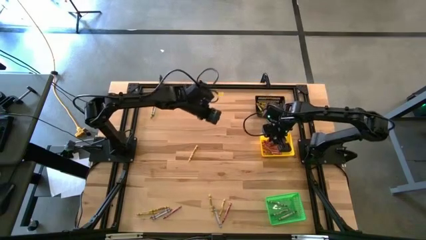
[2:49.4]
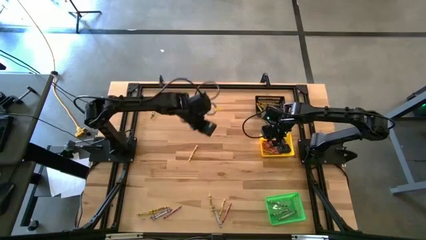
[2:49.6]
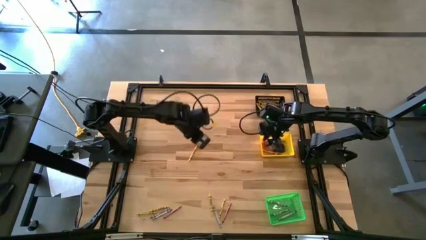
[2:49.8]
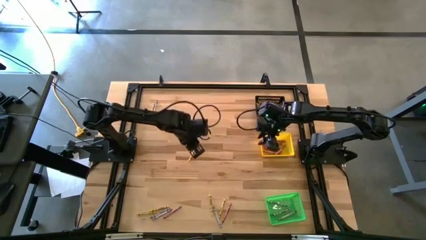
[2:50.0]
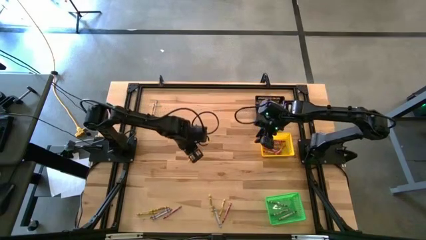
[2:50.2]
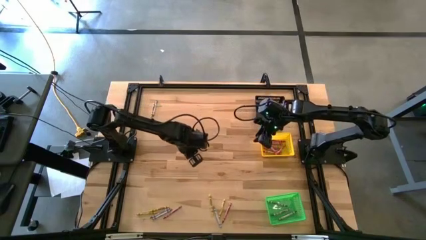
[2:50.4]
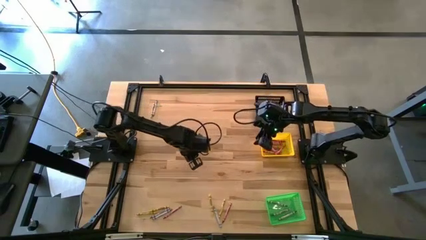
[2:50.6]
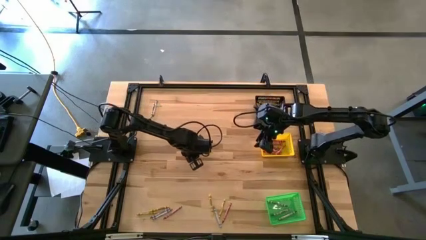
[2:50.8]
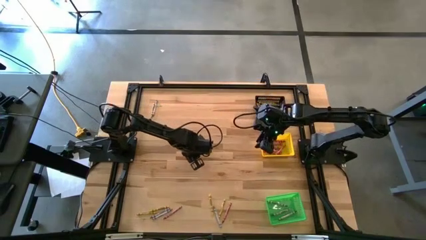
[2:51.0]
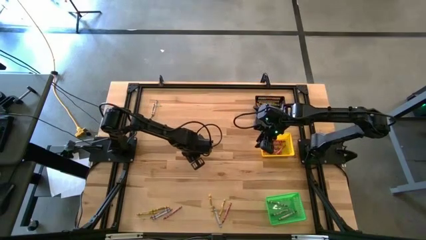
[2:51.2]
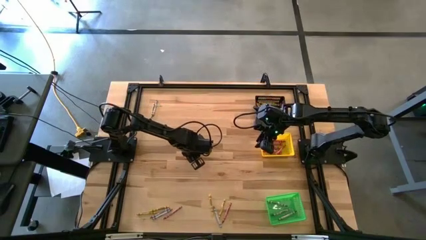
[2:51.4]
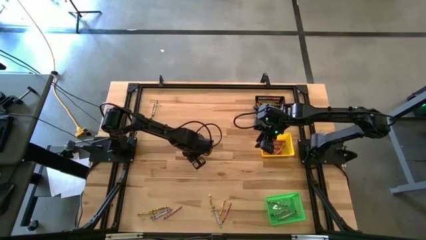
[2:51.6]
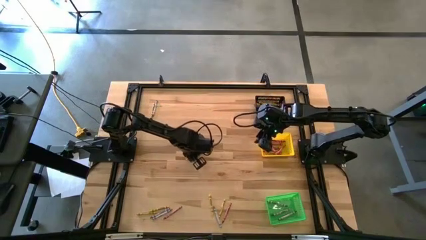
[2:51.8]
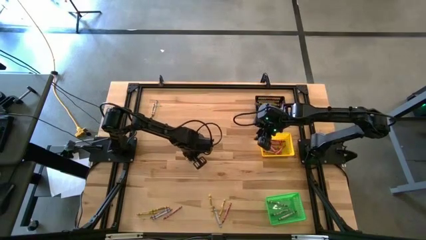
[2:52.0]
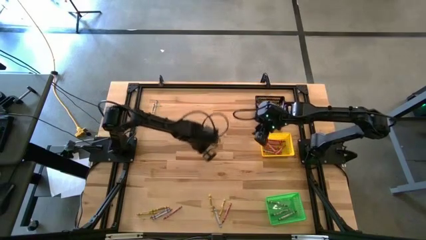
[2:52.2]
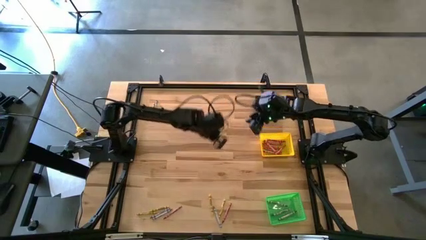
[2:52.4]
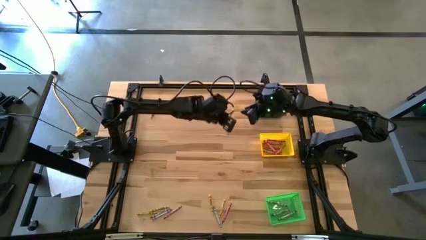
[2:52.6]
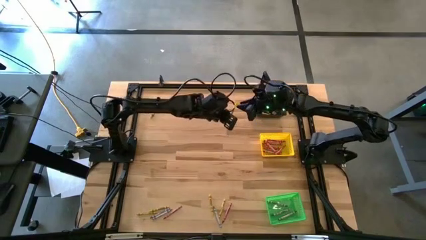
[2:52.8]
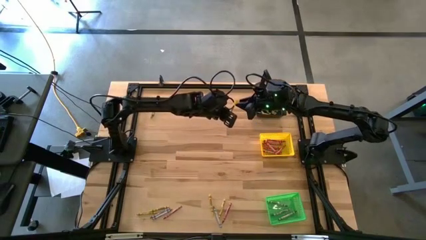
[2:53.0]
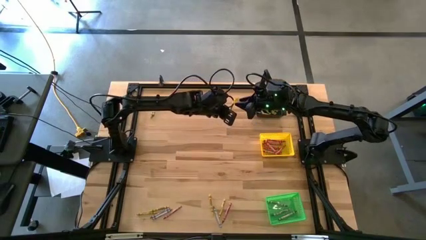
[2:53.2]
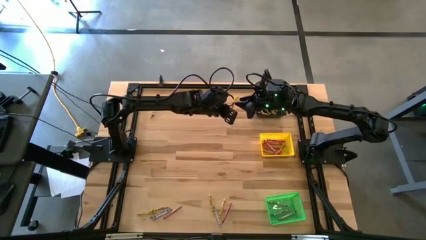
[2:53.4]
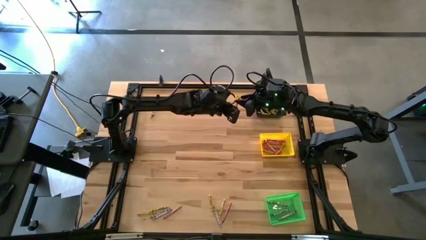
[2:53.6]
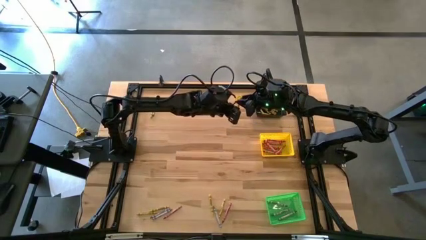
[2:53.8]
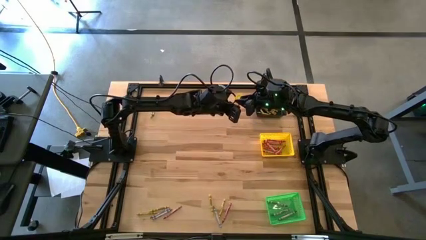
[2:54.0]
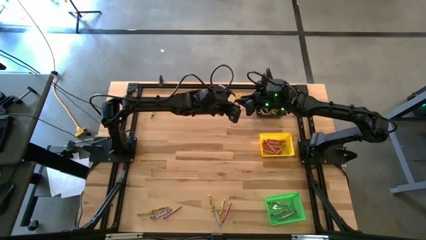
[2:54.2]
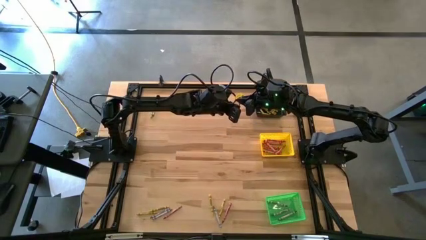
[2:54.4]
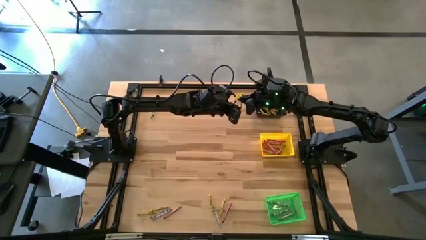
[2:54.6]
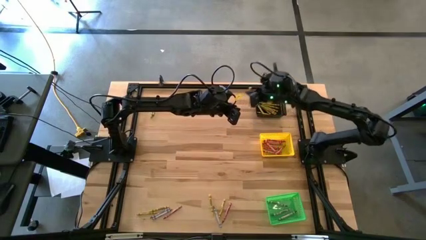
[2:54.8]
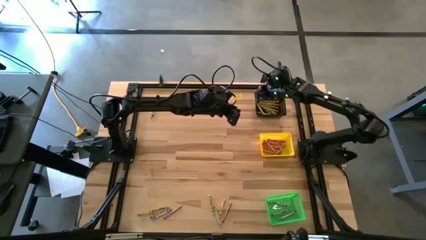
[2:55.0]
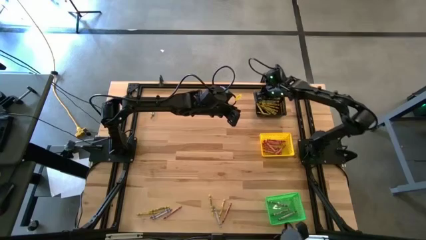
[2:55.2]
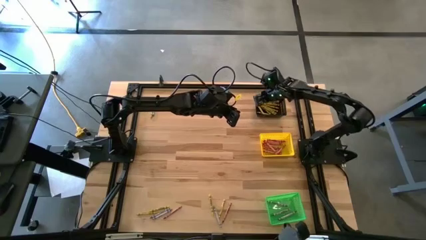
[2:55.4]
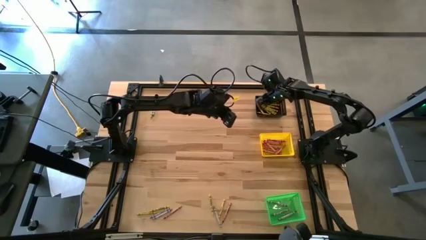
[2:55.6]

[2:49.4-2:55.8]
Task: Sort crayons
Put the yellow crayon into the black bin

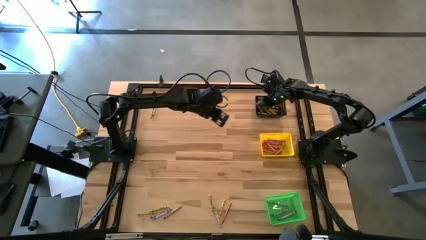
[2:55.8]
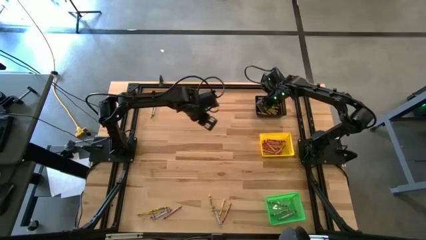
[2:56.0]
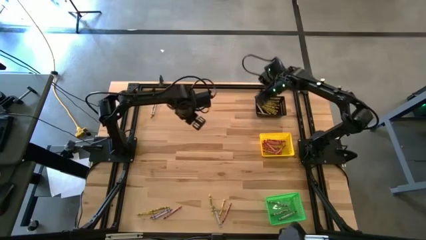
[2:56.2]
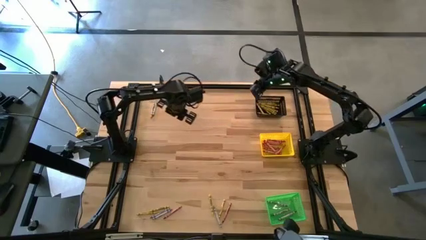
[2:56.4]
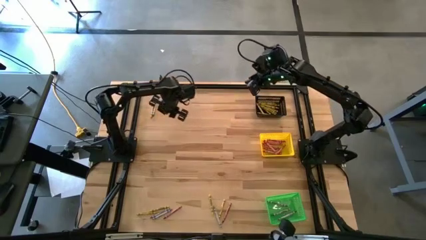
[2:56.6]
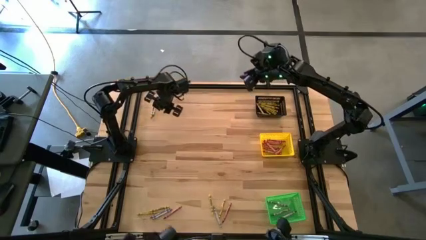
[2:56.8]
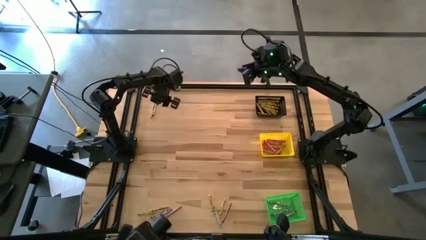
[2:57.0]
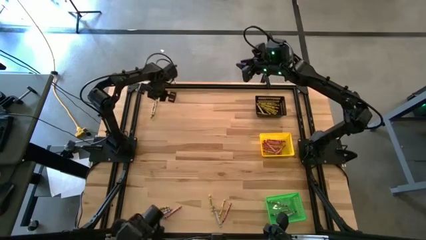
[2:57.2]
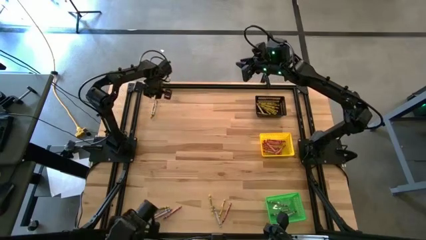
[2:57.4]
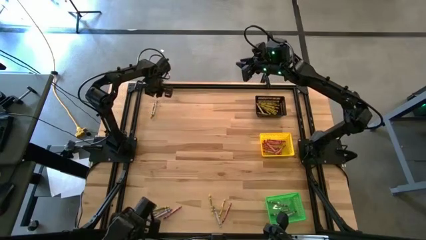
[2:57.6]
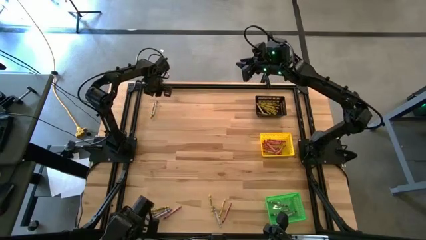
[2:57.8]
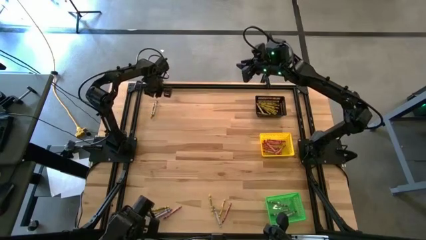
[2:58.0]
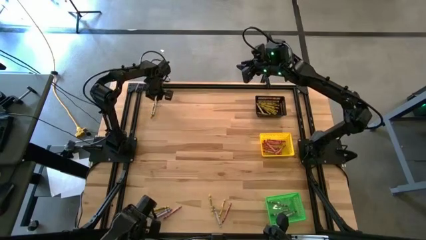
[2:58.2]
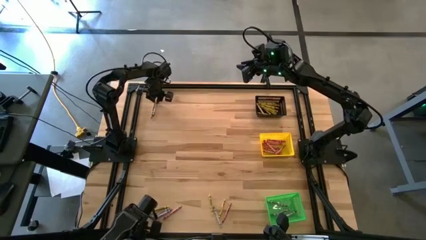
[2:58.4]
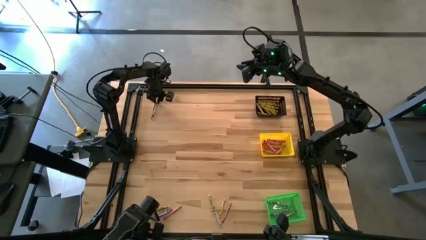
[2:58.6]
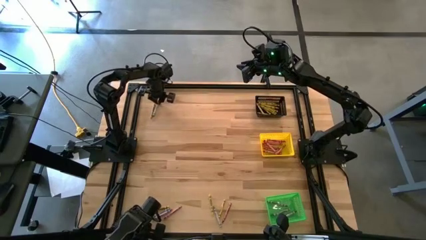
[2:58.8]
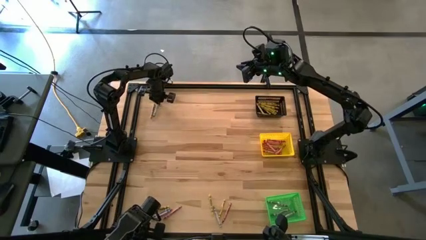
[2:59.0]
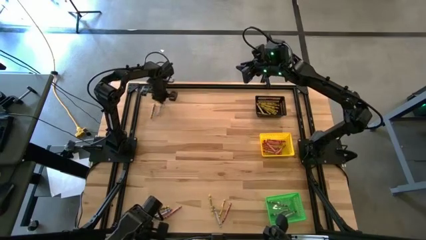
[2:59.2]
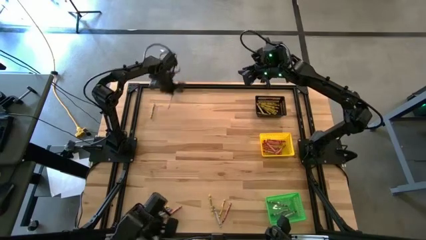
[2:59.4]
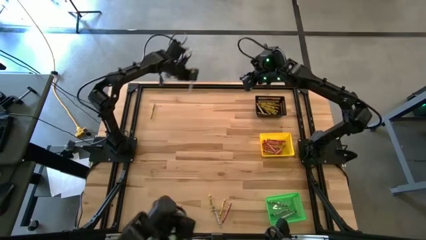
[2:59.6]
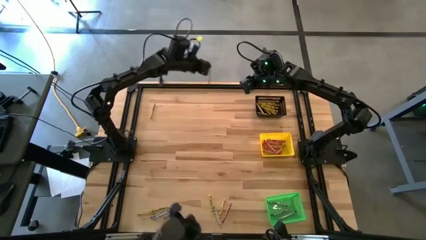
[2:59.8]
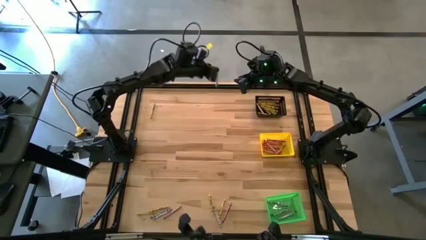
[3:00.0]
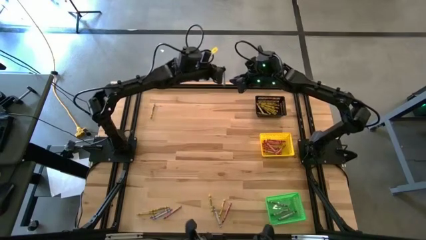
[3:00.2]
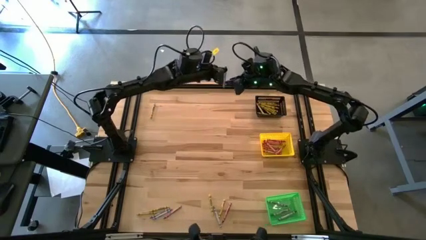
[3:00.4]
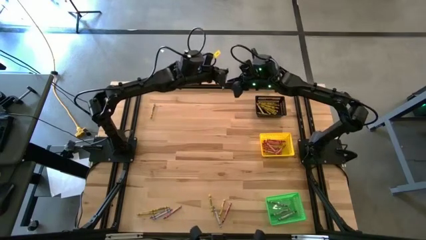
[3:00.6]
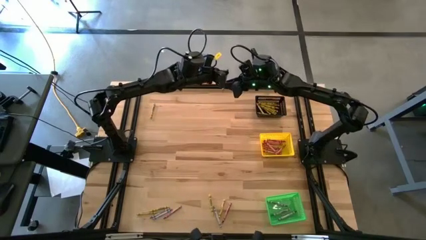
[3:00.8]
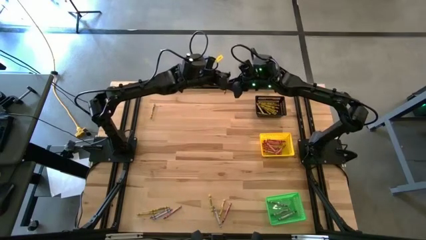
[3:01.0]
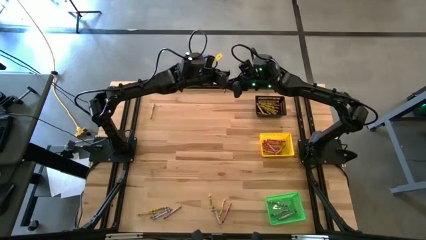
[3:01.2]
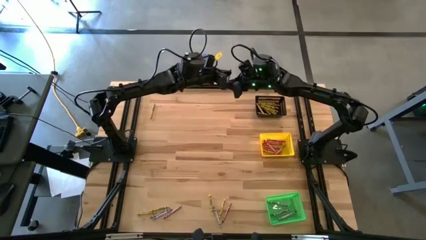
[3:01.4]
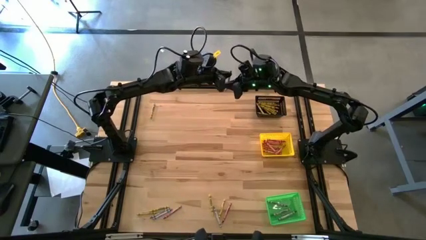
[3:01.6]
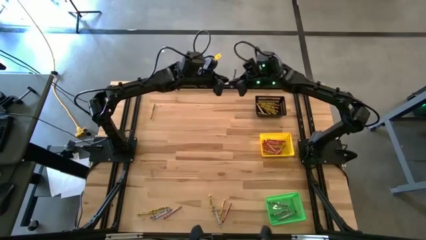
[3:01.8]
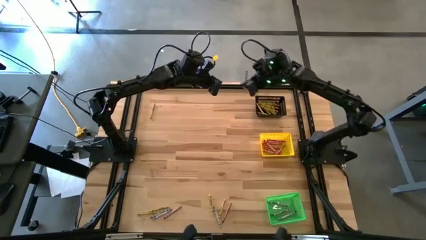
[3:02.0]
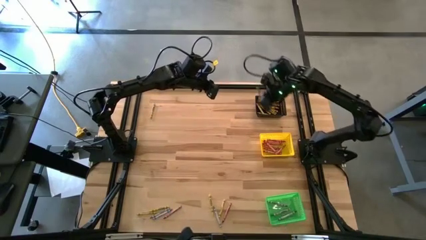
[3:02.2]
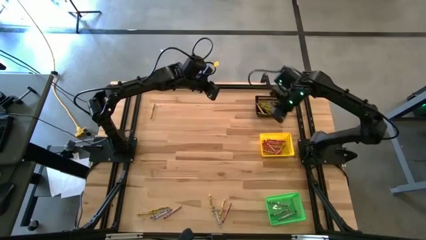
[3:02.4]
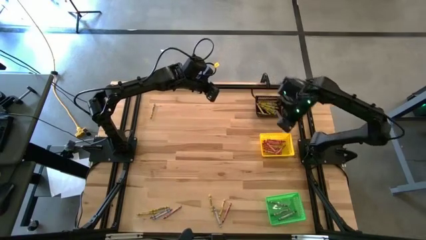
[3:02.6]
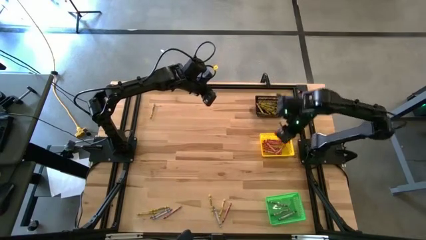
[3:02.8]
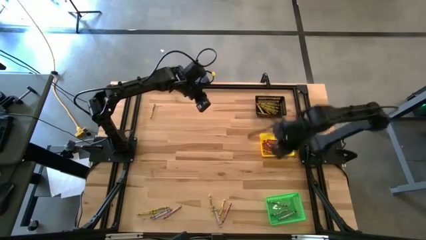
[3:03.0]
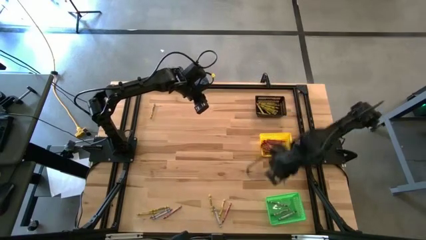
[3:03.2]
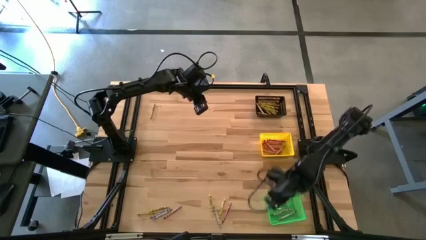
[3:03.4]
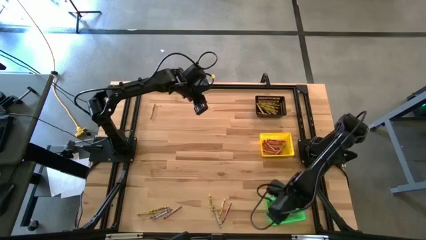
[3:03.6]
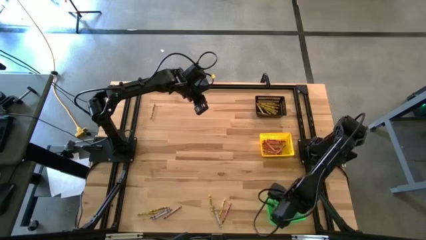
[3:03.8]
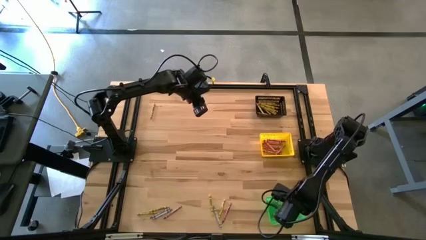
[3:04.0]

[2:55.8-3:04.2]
Put the gray crayon into the green bin
